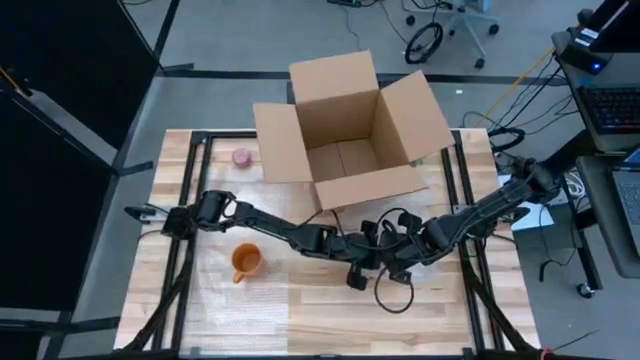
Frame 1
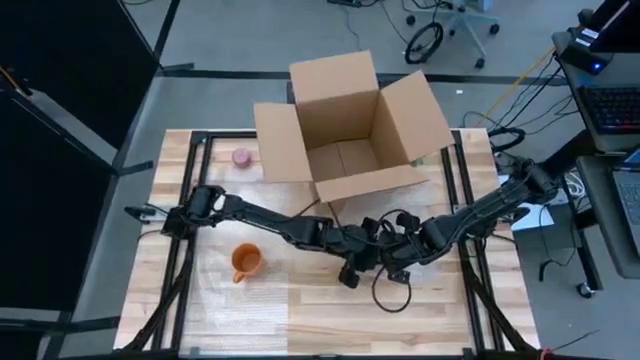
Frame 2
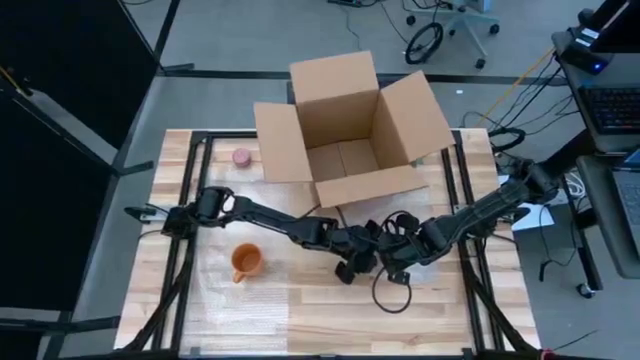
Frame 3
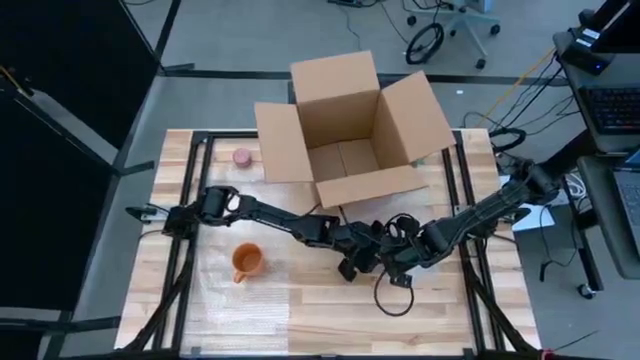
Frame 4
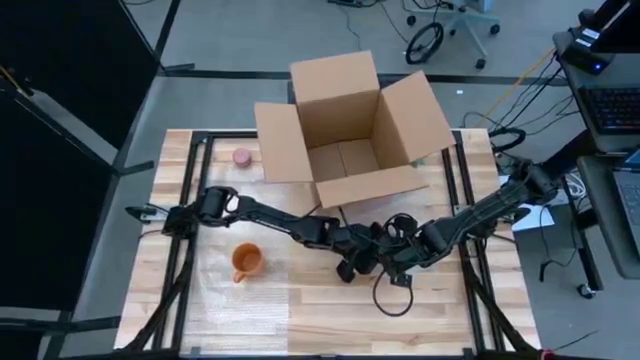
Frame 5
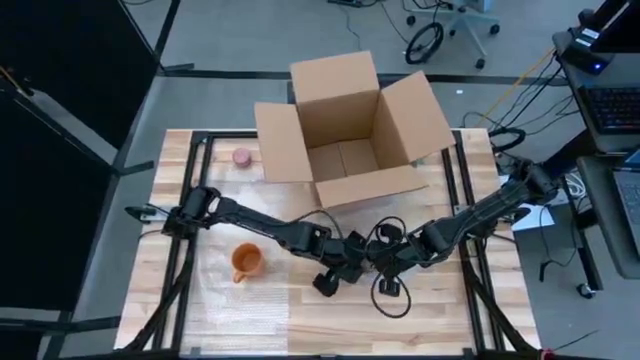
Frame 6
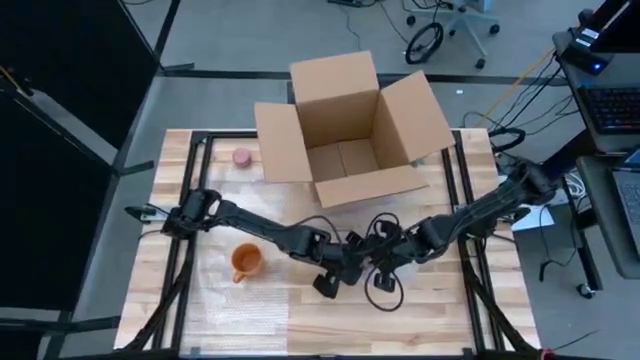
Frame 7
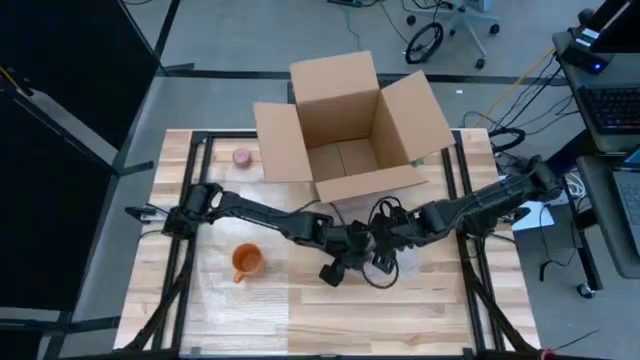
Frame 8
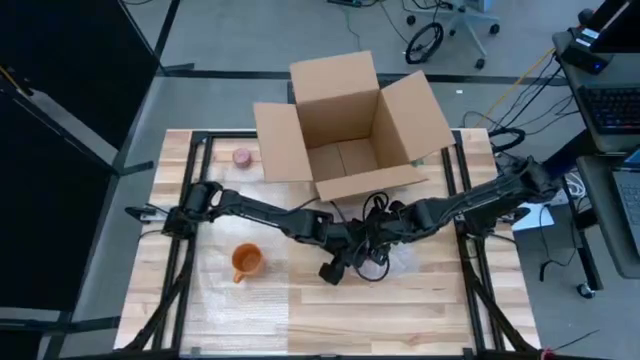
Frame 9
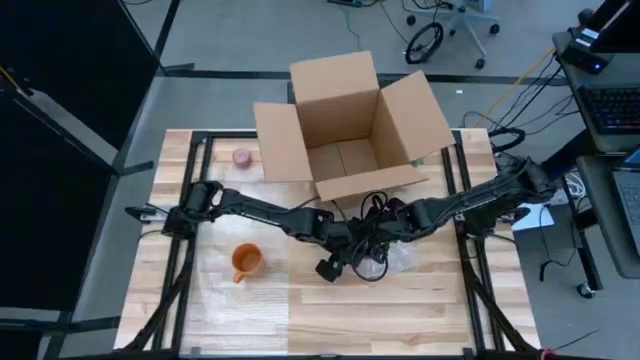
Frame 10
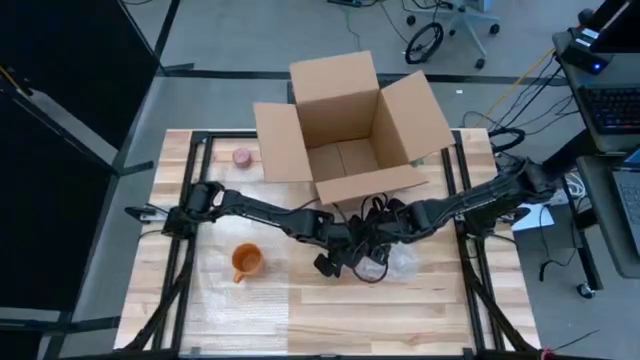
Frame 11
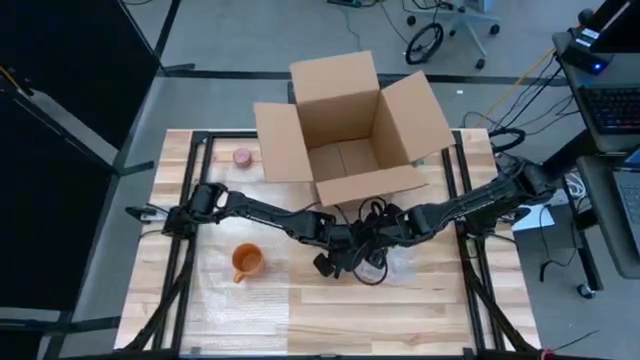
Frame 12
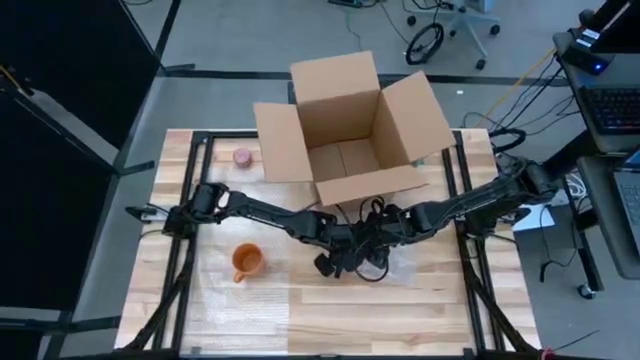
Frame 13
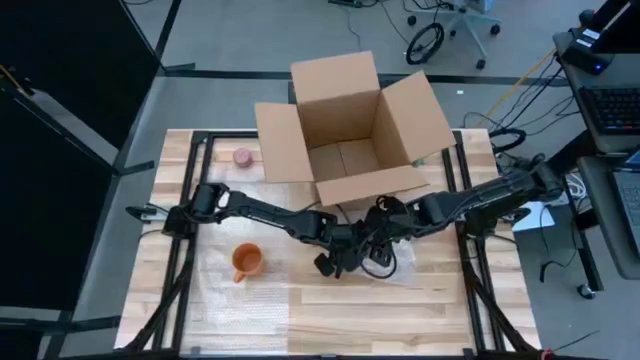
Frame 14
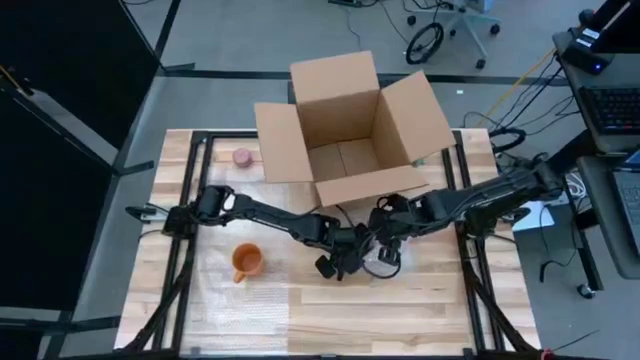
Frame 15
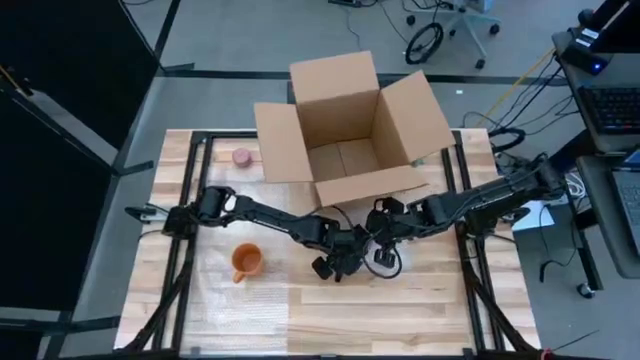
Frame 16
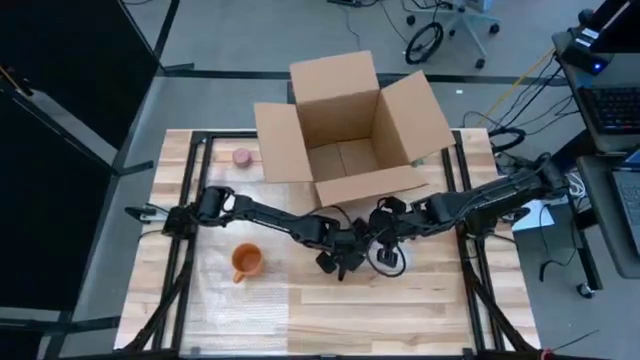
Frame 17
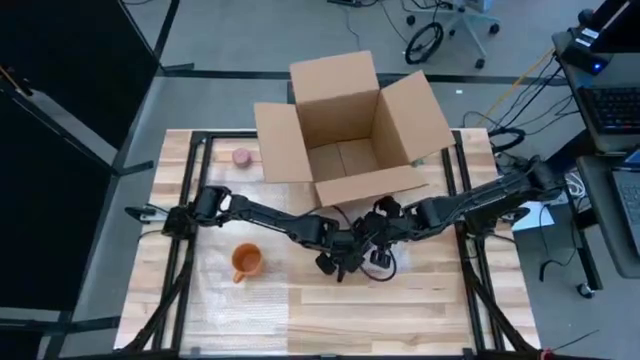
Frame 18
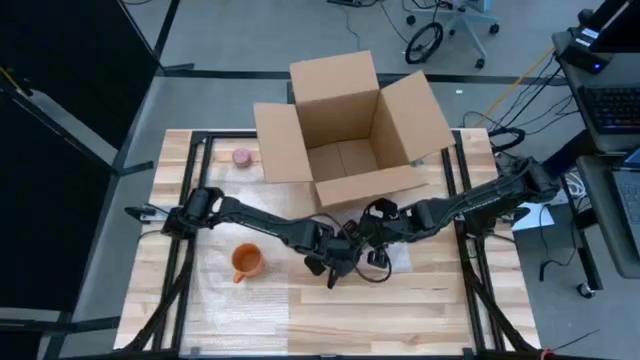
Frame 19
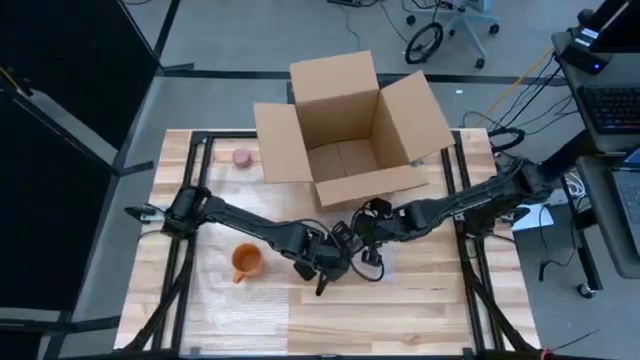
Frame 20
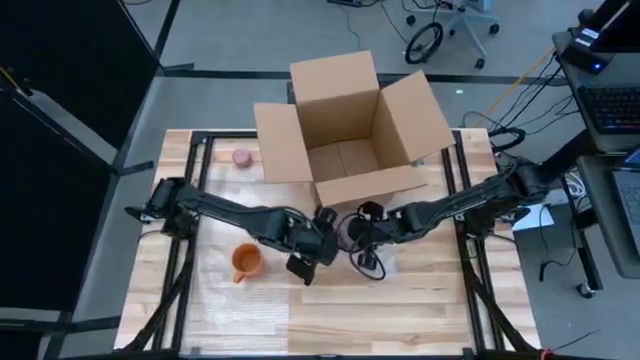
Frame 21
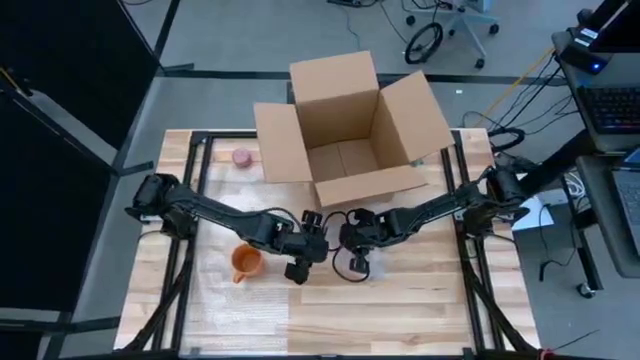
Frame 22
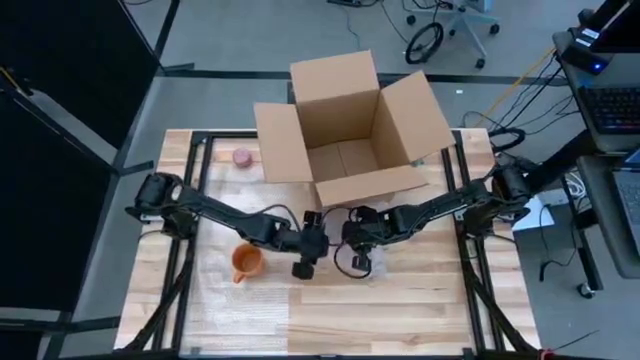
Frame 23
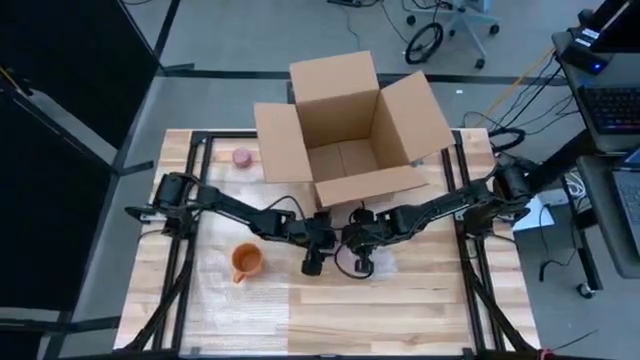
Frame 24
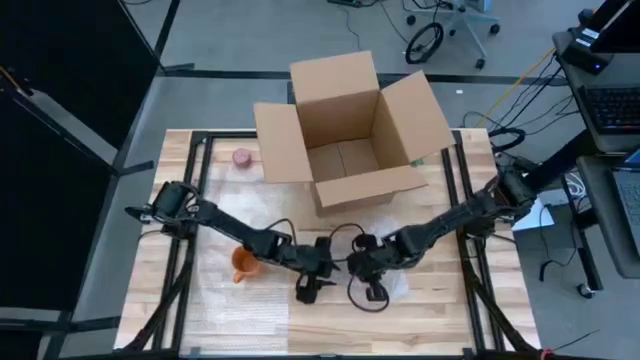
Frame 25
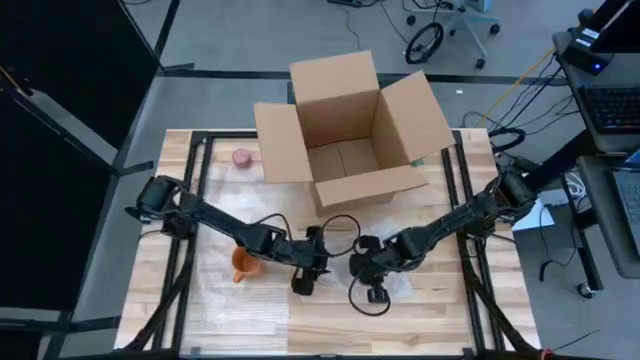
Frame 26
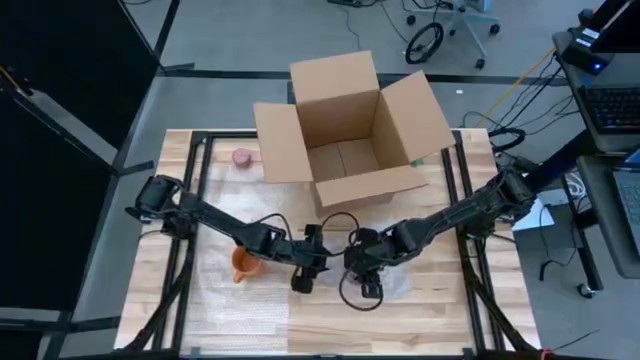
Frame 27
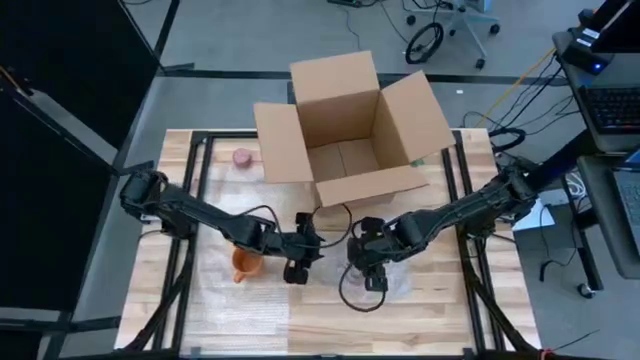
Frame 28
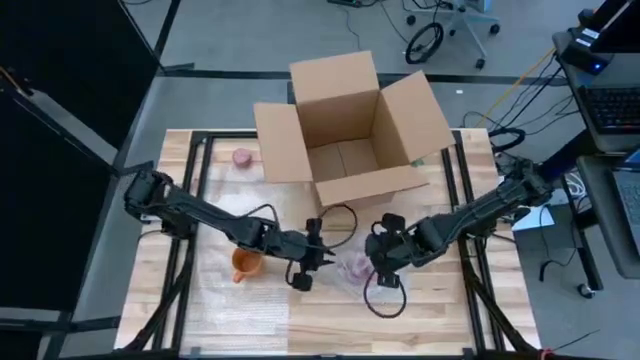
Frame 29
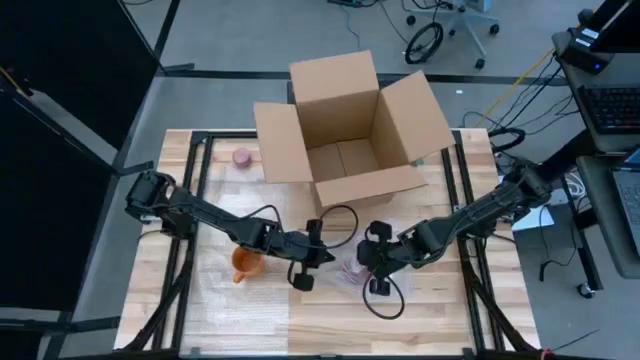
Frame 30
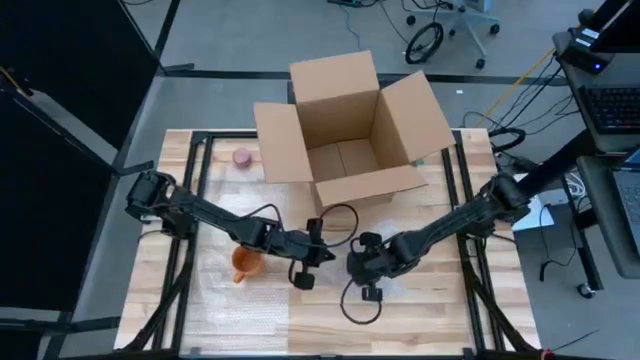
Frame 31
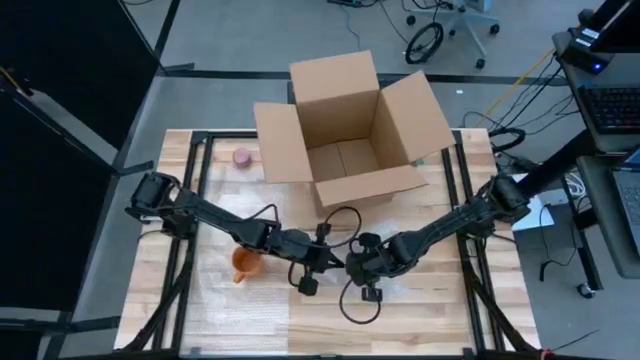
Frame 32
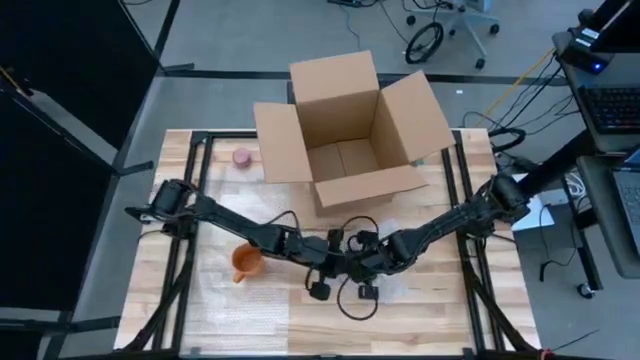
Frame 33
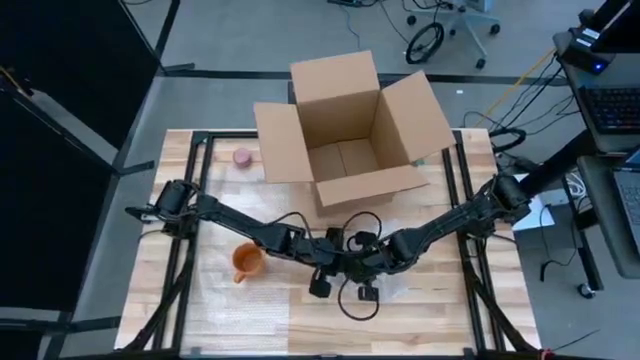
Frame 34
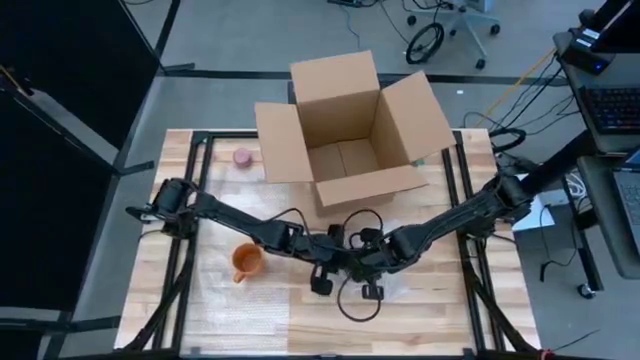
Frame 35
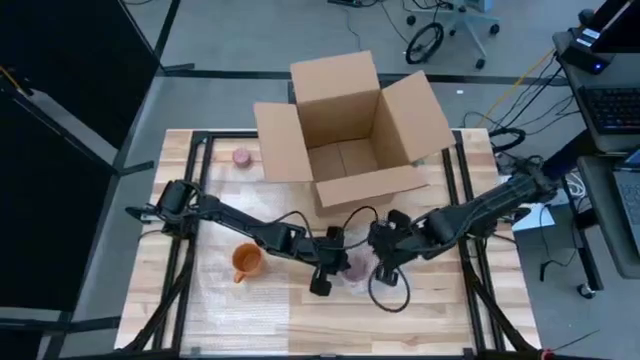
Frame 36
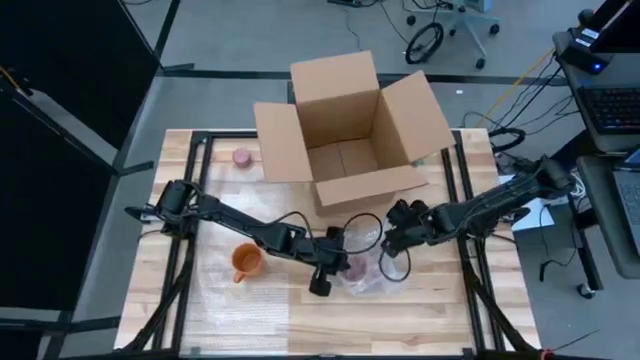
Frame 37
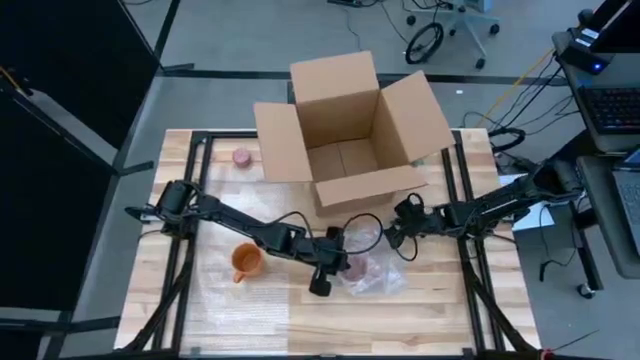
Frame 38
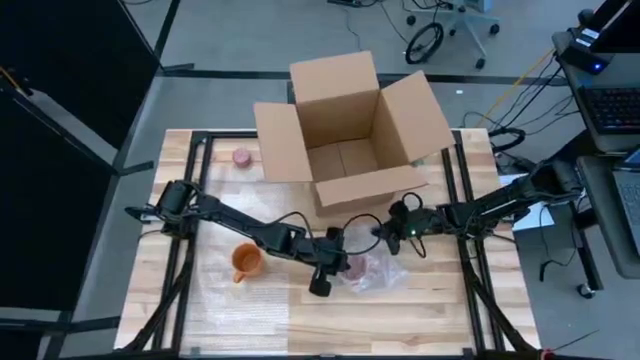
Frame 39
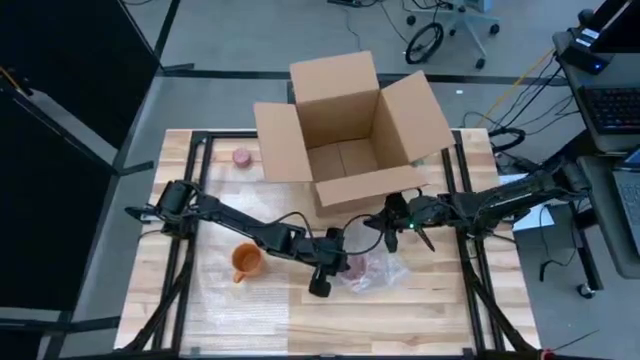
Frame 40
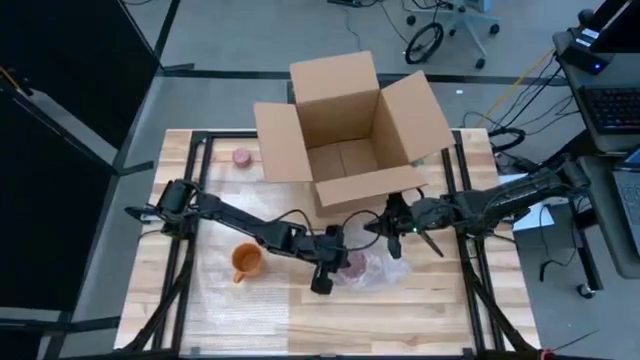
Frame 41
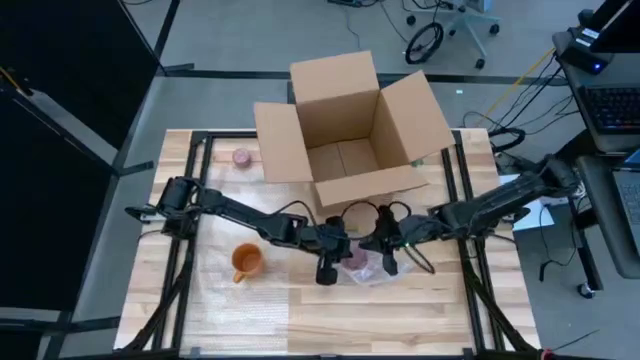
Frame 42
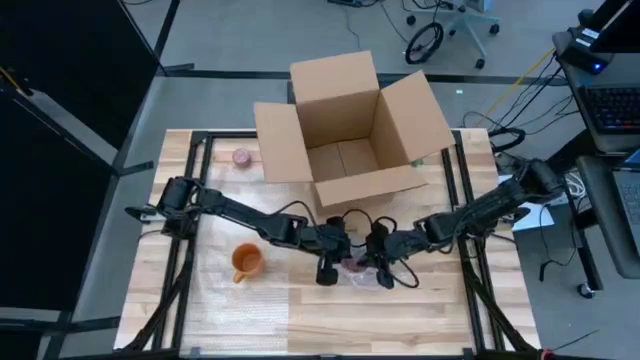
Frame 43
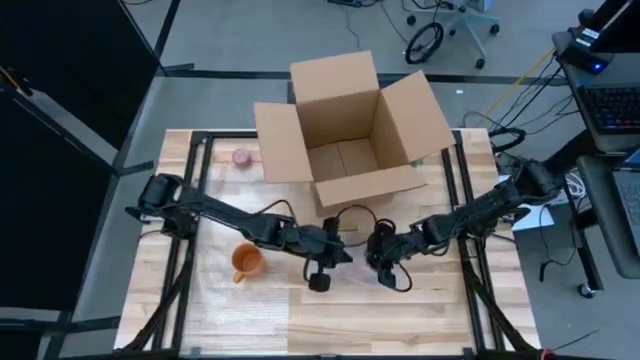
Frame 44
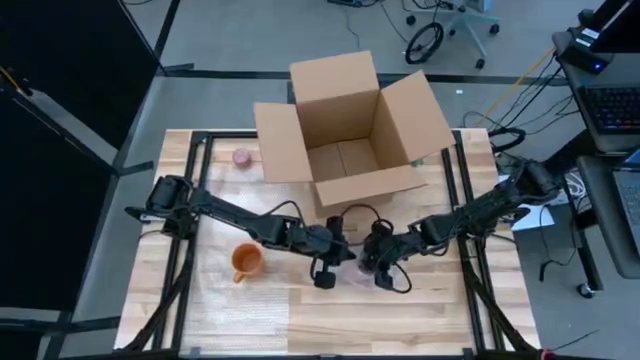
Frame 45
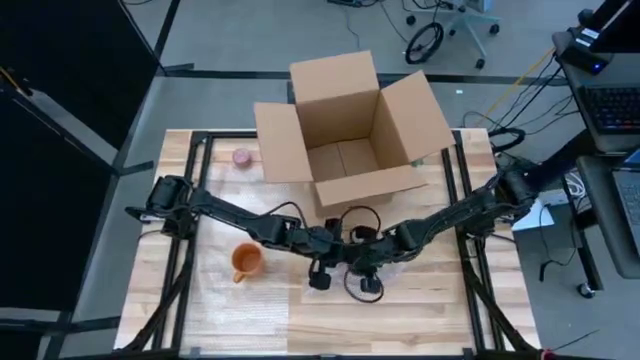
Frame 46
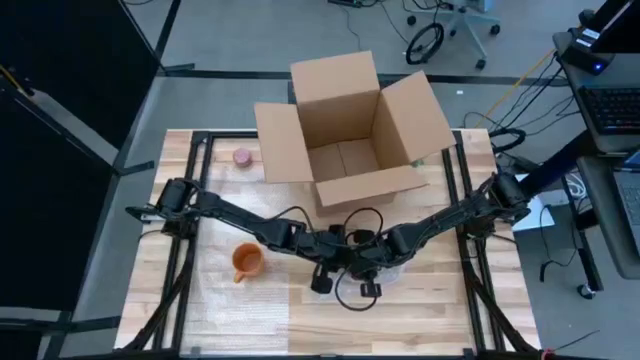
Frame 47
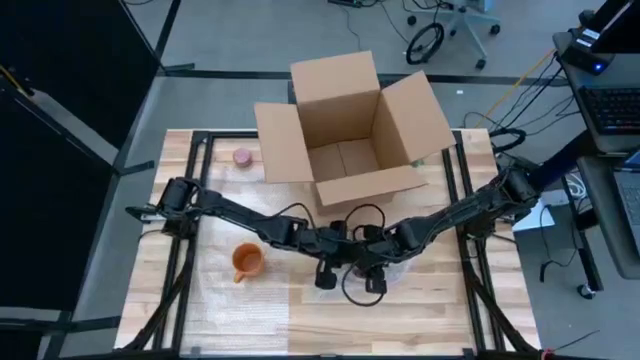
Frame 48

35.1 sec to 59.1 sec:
Task: wrap mug
Wrap the pink cup with the bubble wrap
